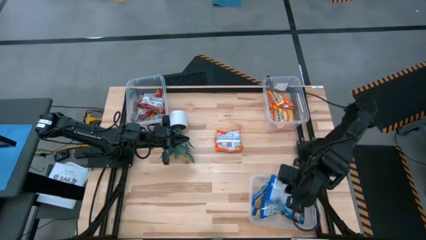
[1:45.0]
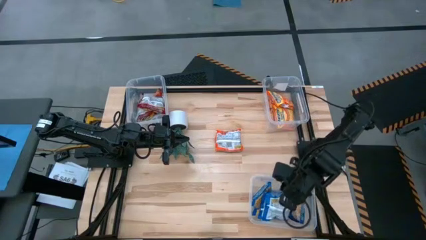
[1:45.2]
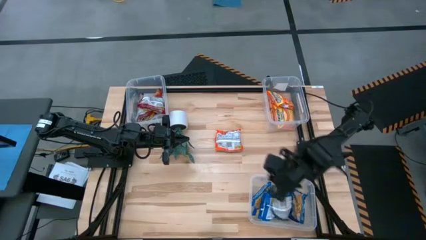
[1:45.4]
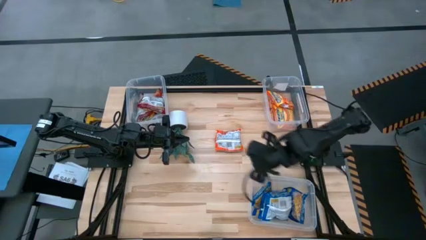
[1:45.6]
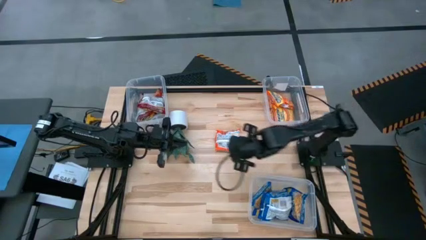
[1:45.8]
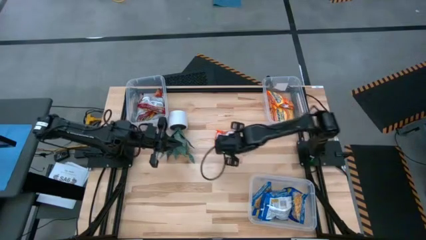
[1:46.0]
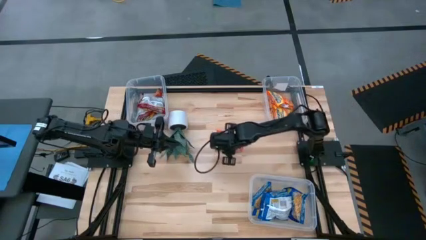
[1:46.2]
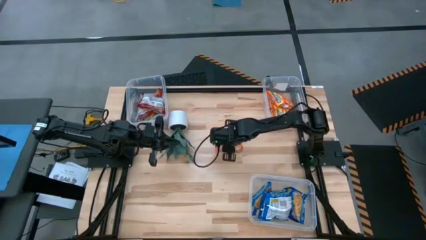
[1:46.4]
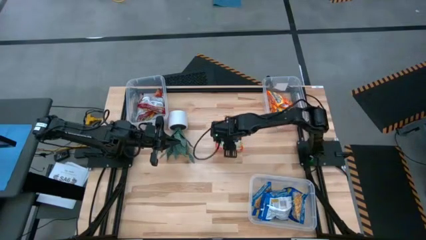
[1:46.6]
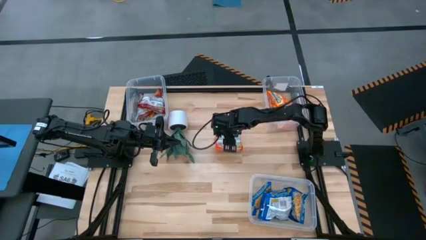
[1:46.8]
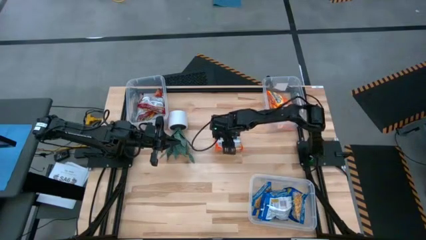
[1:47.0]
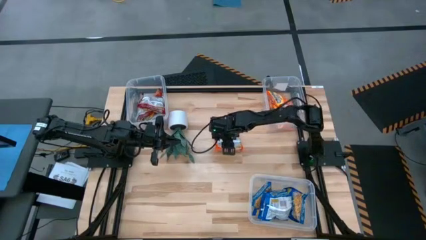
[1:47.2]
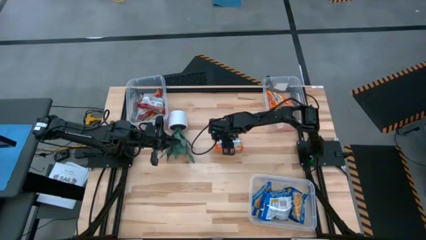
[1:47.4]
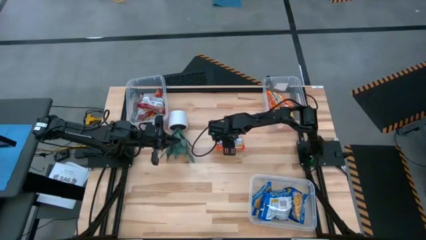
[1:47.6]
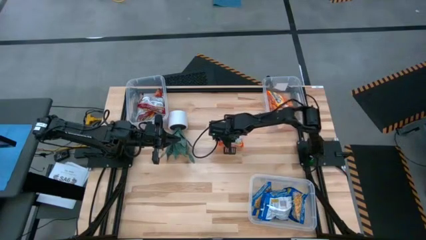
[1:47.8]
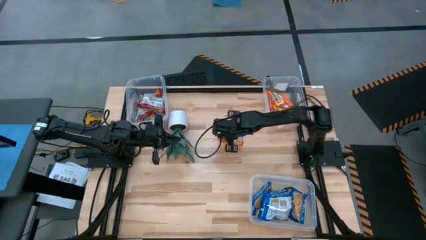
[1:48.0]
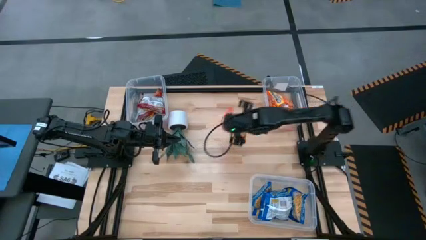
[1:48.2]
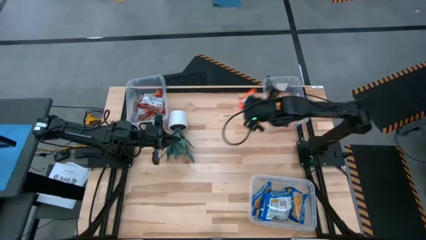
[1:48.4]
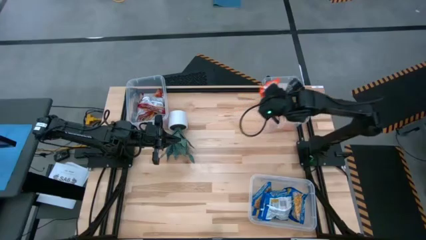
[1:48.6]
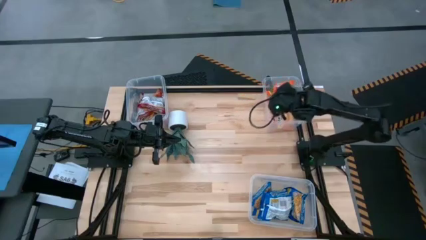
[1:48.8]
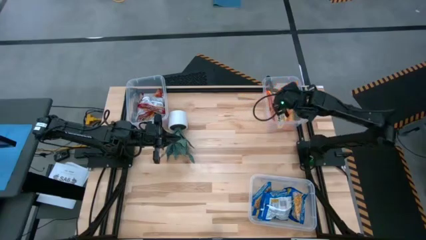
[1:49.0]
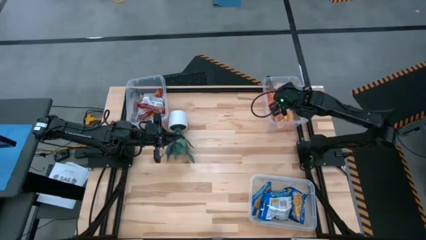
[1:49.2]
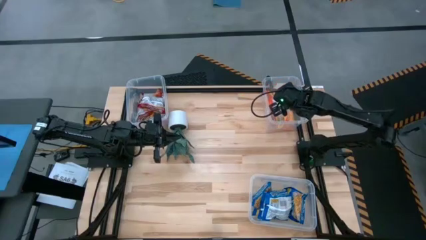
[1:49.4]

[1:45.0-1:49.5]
Task: Sort Maruchan noodles
Put the orange noodle pack in the top right transparent bin

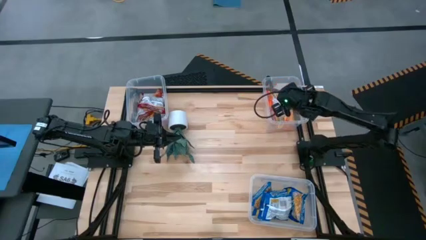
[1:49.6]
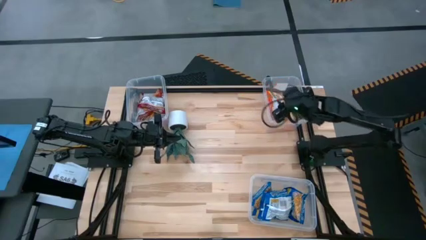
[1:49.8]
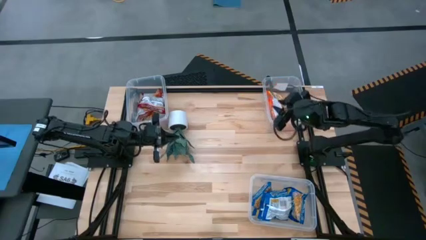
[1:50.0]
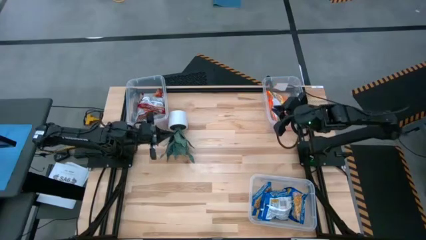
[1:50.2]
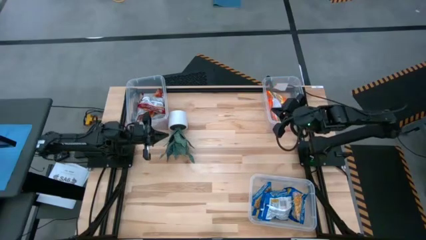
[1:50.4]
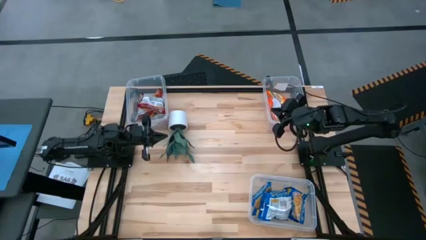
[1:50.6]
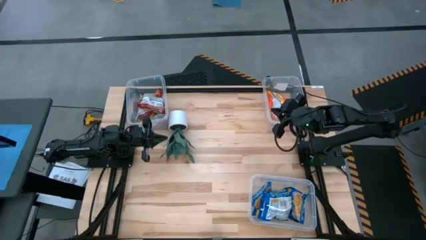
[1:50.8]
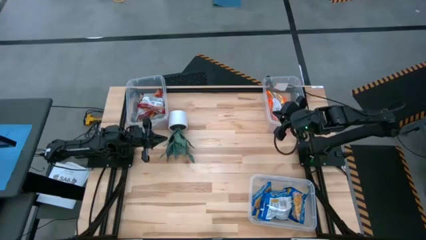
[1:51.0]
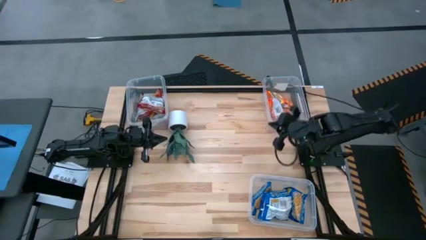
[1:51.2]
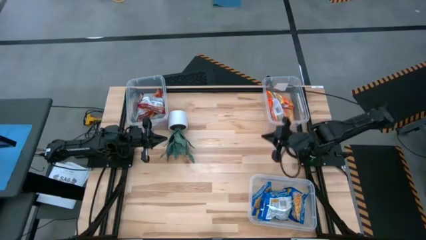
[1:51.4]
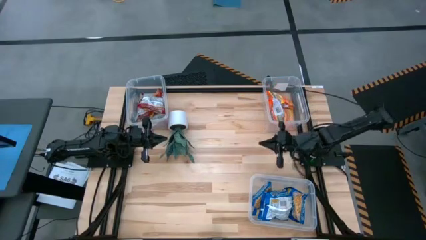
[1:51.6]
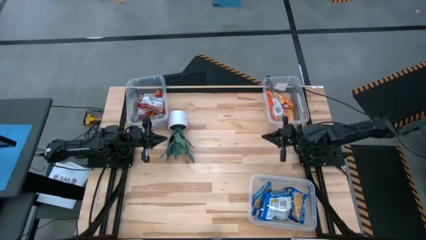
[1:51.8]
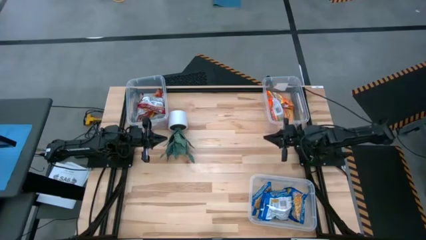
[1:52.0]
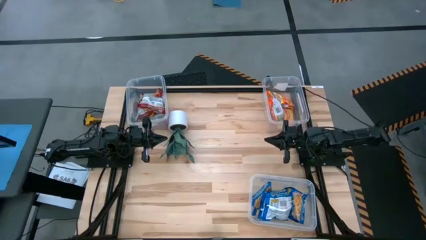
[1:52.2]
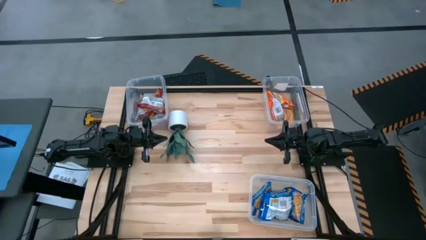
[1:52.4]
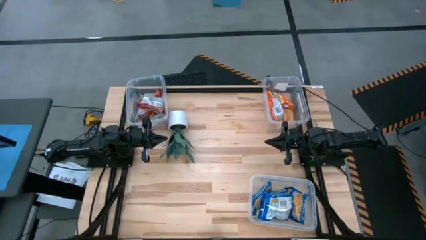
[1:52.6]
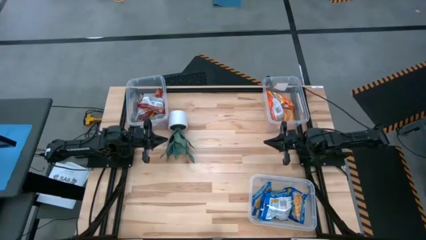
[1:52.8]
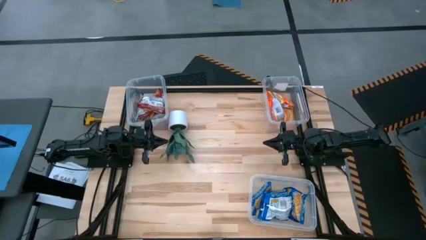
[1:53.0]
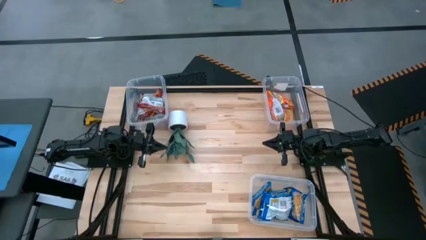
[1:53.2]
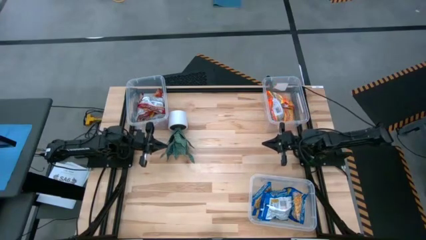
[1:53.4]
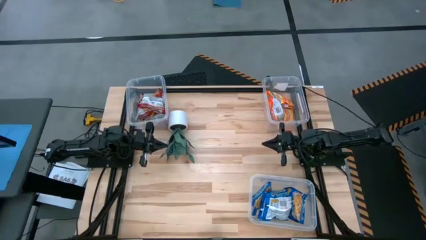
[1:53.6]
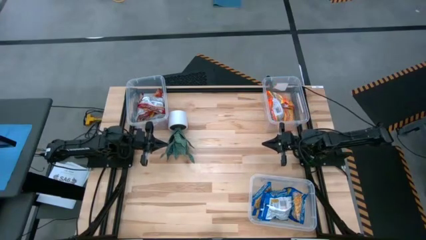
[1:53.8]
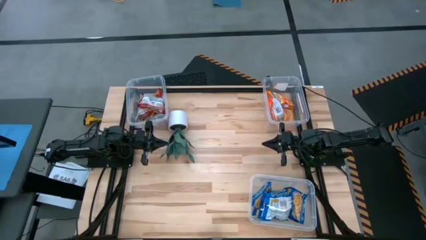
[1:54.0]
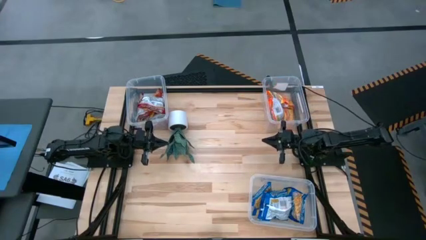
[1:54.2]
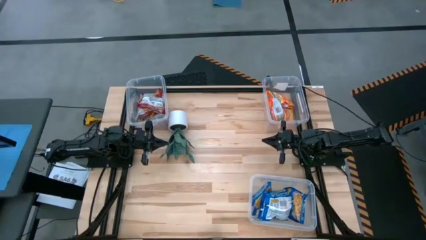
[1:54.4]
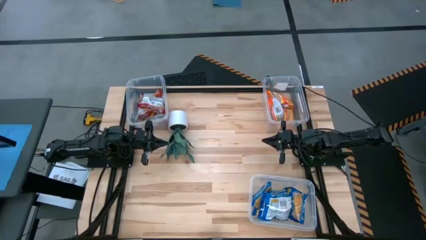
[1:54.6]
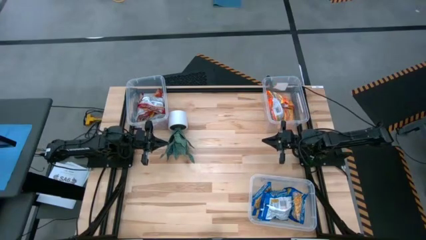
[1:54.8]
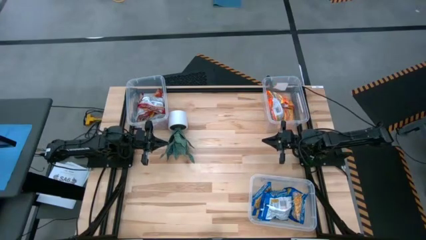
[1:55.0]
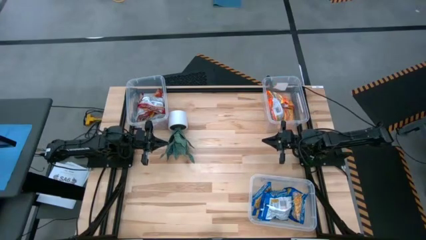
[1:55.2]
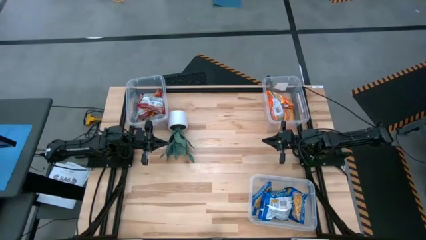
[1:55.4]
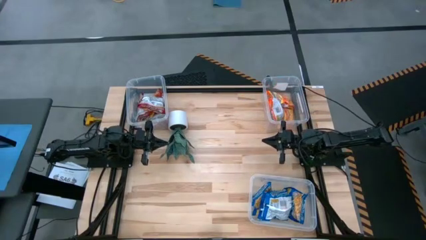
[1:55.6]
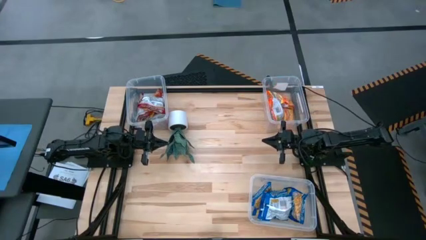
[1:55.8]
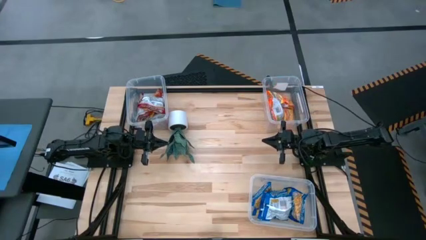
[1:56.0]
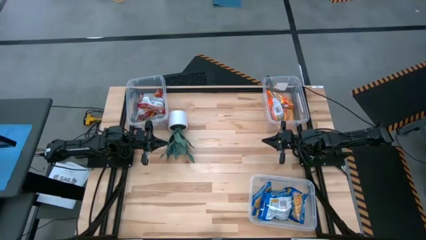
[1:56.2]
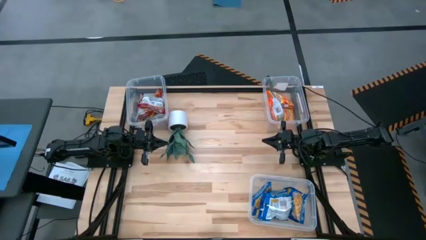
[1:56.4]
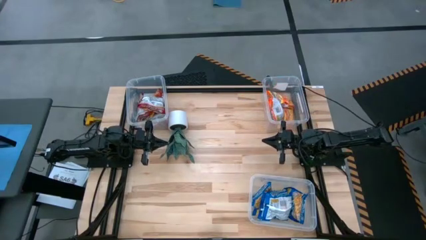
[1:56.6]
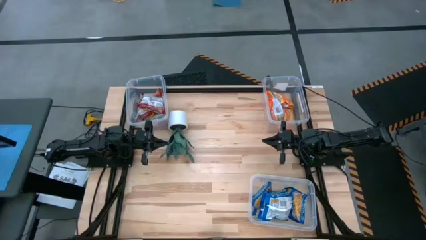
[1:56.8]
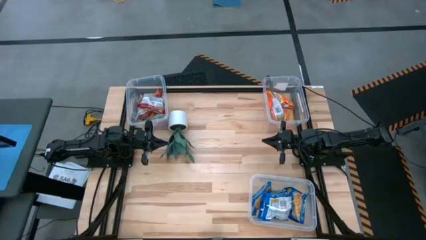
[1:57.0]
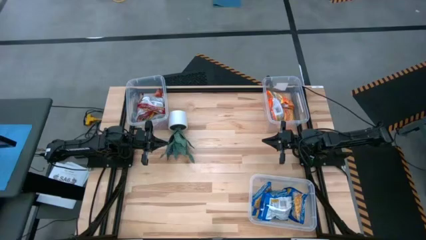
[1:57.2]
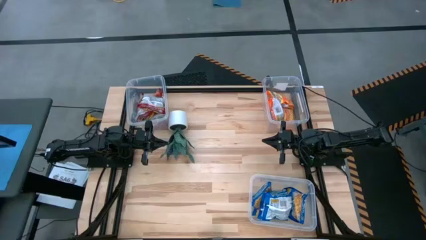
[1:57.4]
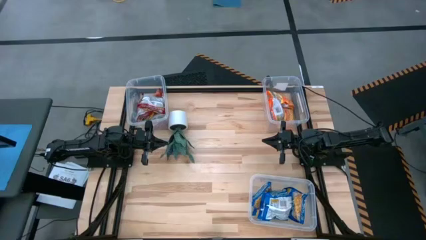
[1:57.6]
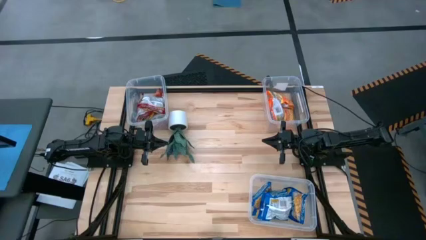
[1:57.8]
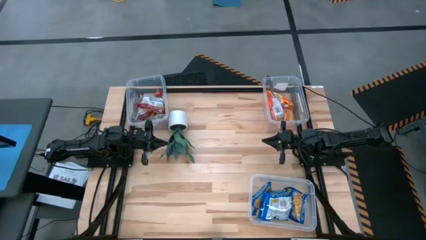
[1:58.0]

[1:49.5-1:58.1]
Return to Home Position
